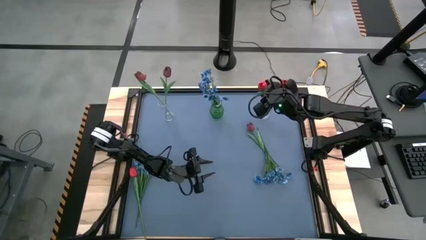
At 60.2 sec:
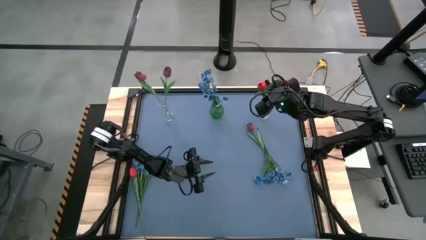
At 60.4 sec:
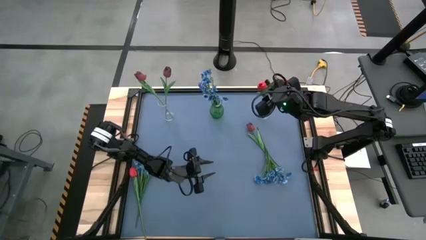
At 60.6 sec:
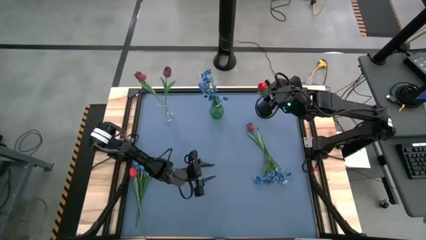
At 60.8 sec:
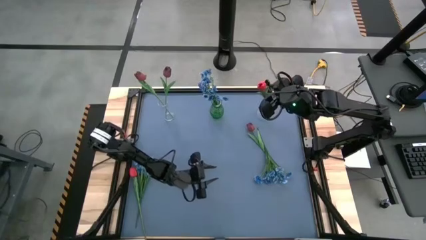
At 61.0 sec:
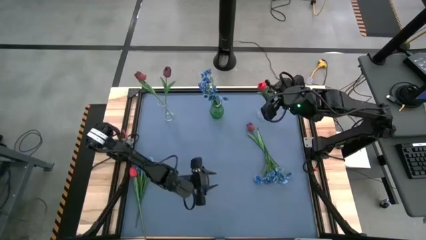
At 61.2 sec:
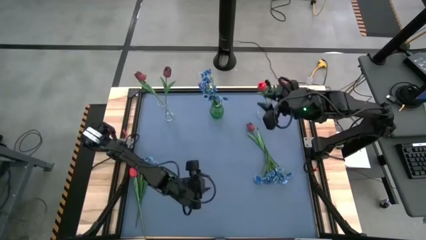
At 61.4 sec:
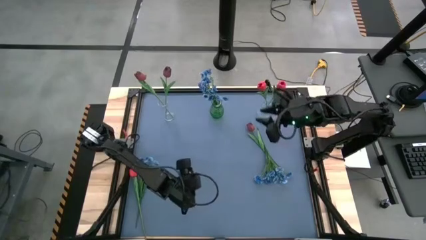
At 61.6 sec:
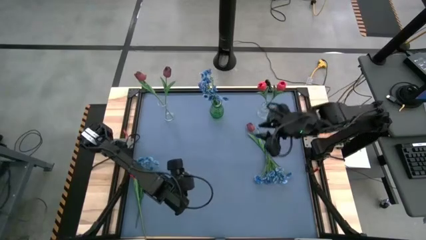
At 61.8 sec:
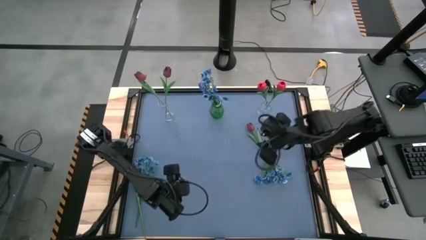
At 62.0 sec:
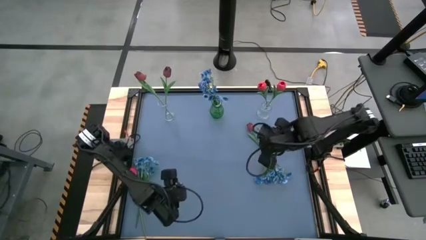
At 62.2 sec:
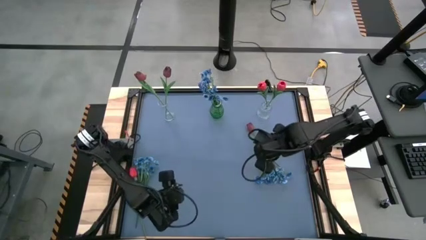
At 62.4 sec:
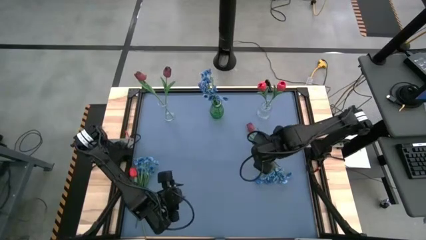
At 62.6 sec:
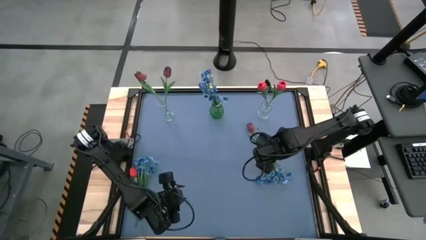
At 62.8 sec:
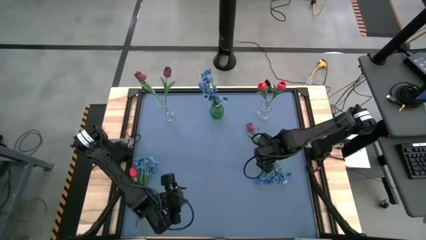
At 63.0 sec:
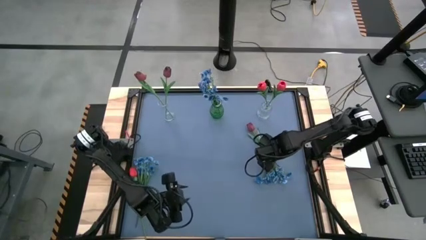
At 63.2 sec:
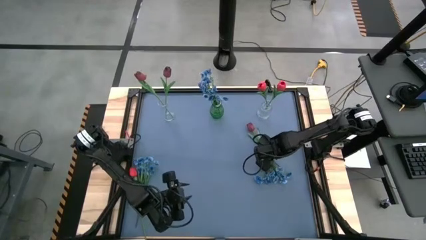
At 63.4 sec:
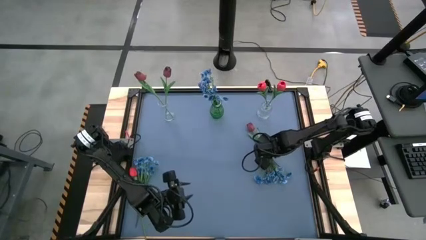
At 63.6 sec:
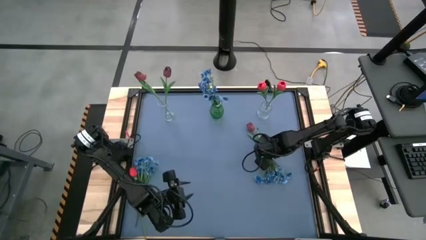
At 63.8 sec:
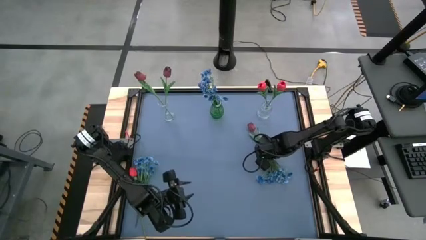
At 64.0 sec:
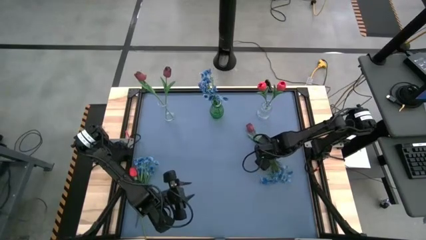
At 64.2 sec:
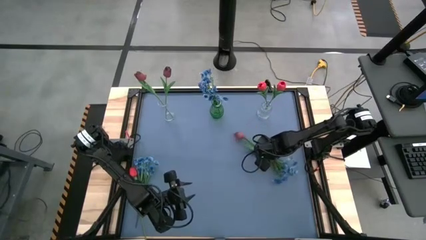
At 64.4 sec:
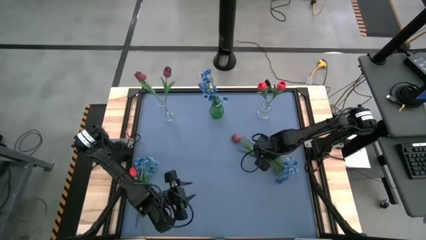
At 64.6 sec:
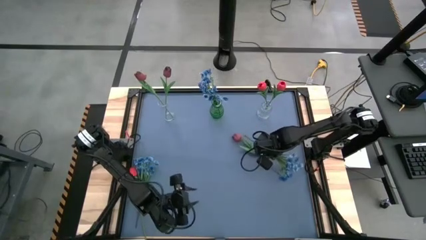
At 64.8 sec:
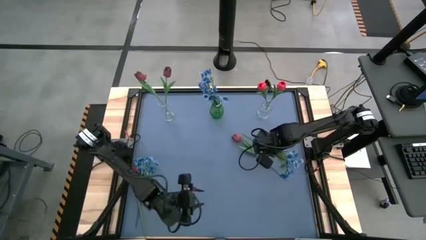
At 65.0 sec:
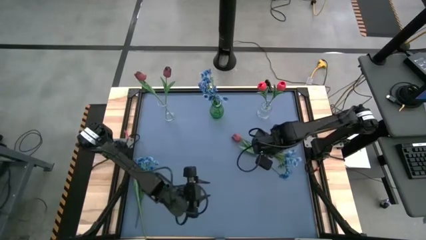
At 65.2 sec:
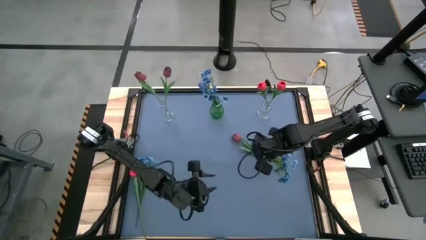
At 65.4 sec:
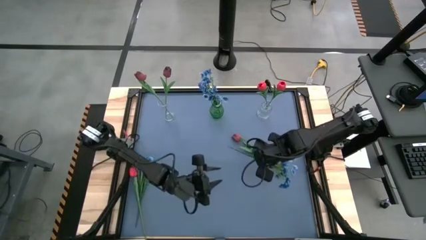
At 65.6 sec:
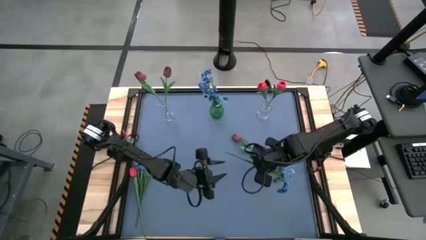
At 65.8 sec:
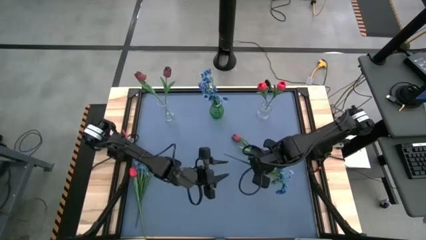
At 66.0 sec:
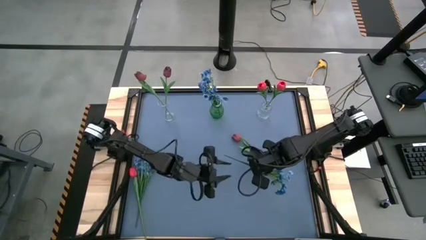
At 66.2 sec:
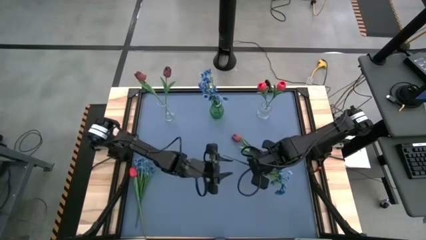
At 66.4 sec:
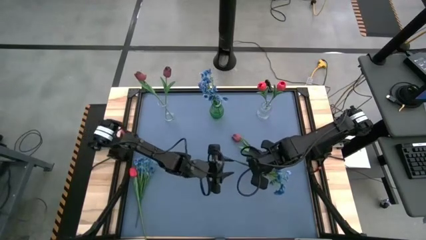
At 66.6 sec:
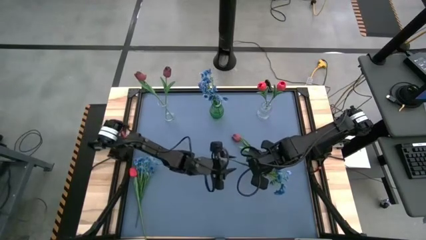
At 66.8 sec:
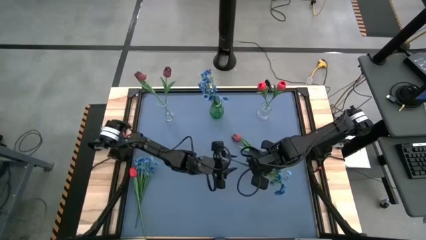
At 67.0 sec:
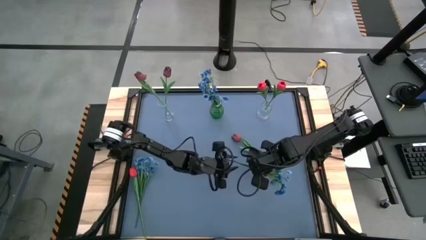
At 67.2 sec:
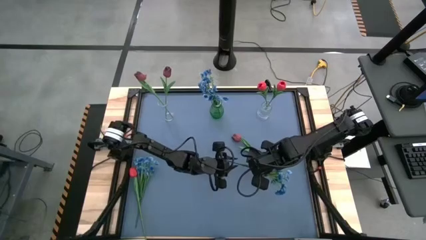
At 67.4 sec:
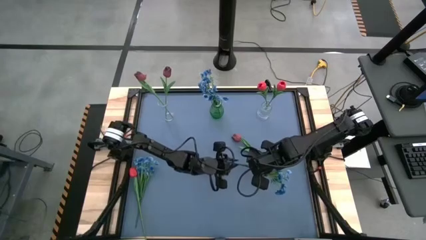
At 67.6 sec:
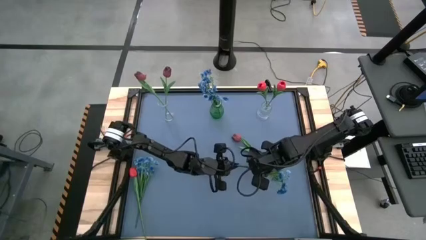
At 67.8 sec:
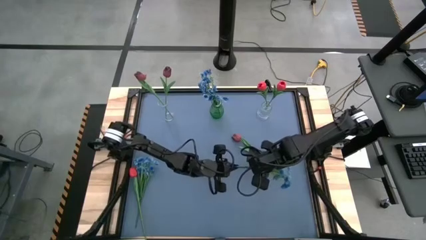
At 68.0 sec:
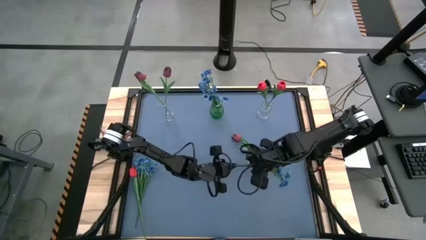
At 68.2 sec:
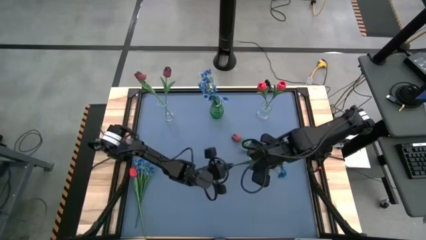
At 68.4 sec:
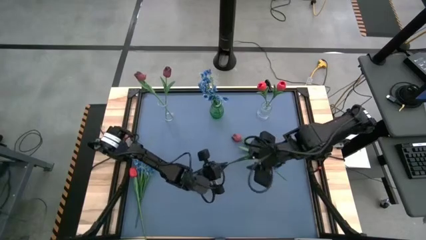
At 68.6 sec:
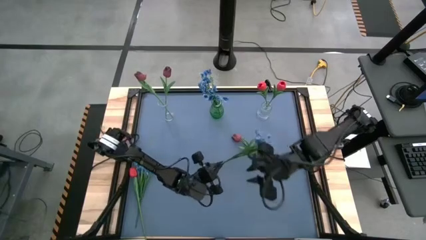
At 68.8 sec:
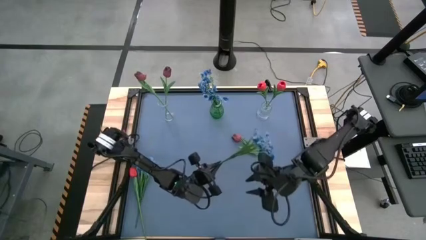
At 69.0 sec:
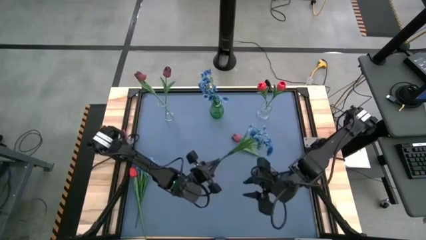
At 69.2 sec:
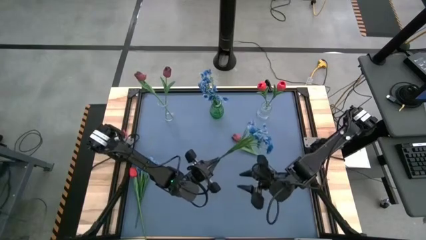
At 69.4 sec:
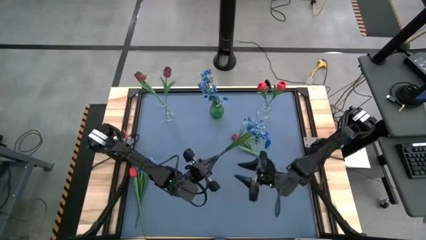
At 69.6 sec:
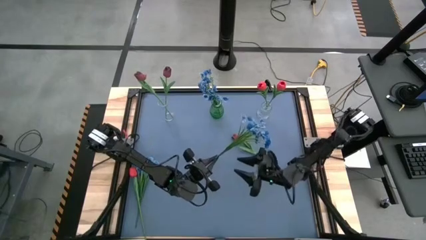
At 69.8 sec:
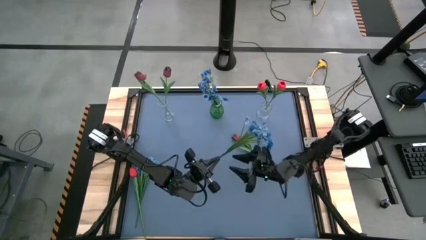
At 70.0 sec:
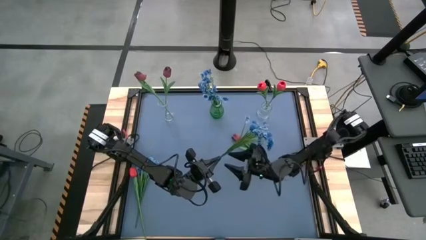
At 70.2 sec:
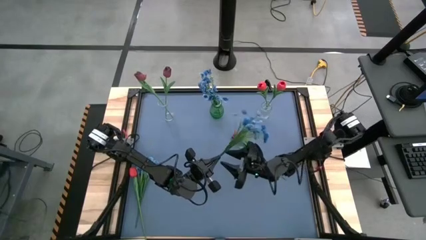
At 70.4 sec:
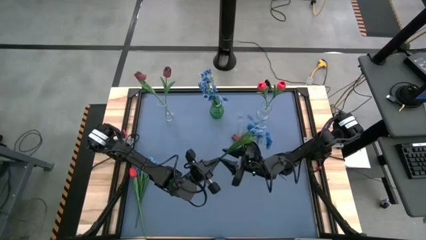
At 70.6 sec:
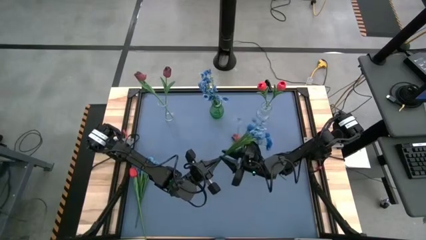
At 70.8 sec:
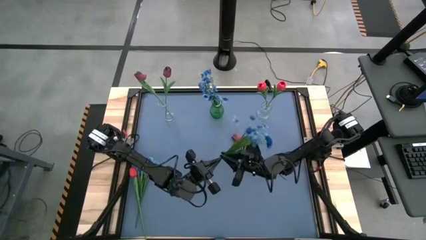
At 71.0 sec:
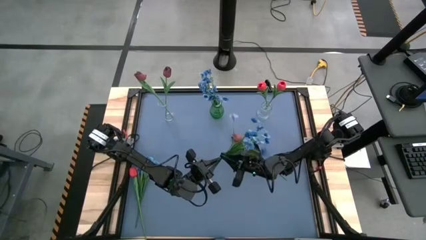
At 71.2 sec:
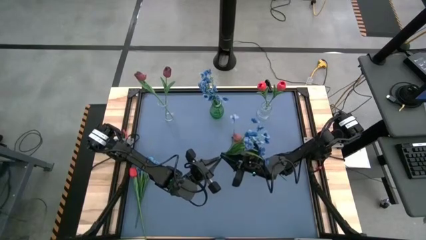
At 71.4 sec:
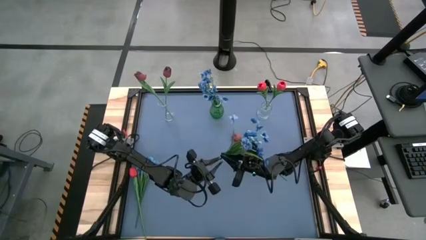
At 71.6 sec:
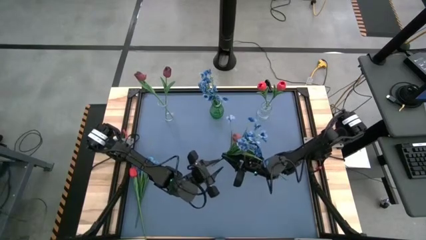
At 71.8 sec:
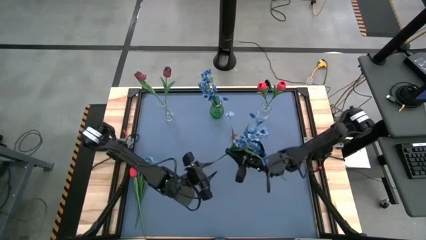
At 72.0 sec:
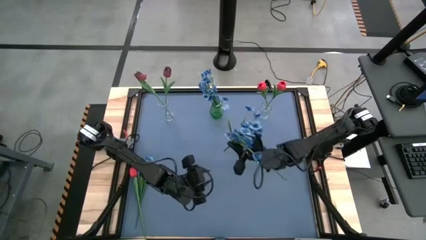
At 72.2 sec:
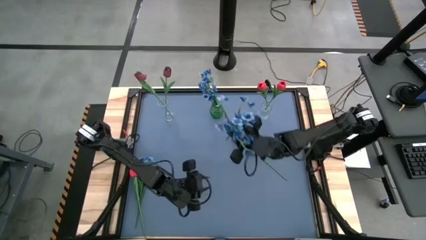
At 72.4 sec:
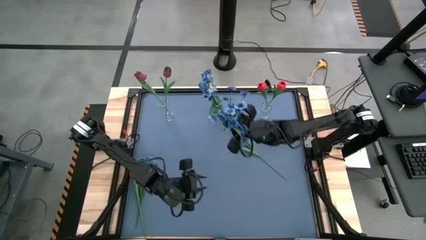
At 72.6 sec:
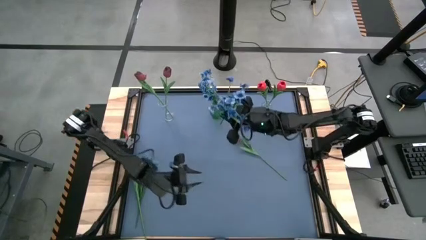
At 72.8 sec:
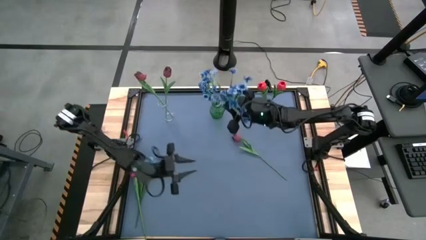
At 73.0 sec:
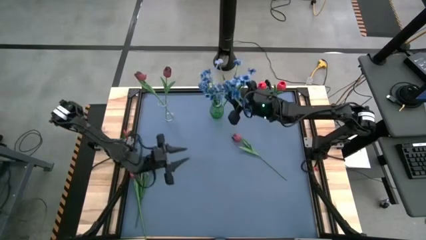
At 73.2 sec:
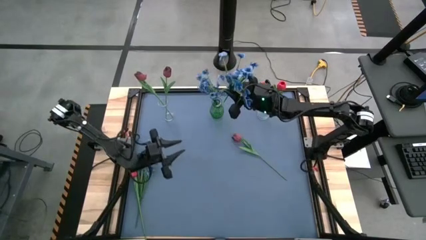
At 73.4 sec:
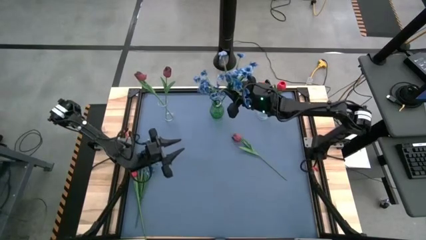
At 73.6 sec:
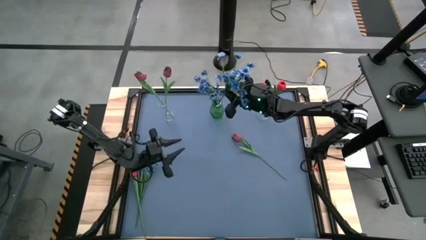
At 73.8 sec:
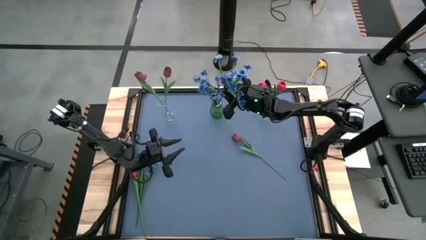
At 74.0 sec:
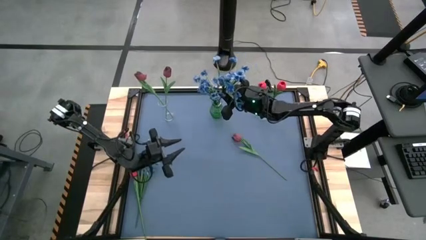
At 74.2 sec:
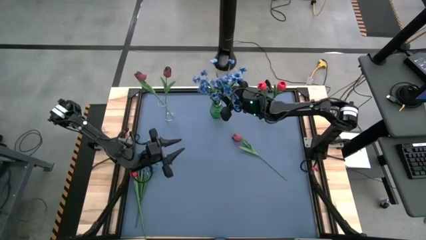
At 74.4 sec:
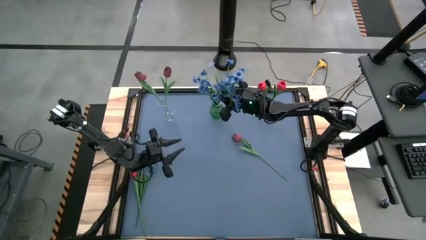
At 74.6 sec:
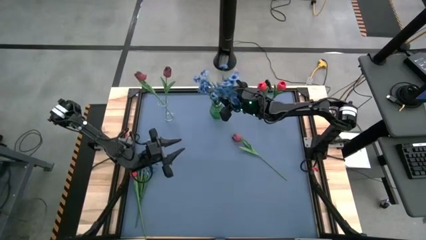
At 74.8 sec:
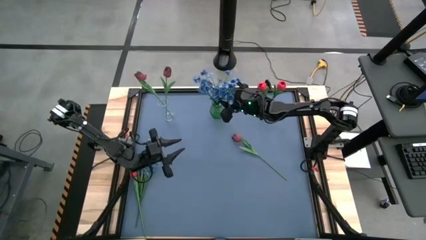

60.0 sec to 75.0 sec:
Task: Sort flowers into vase by color
Put the right blue flower into the green vase
